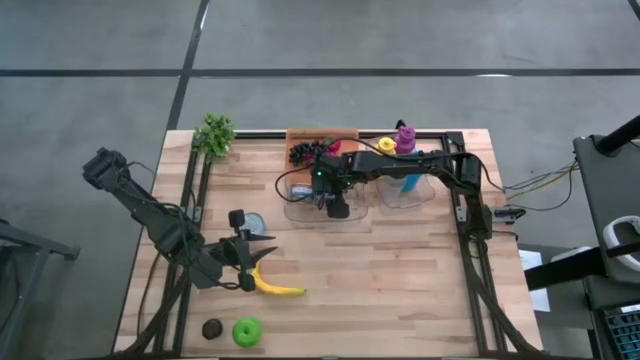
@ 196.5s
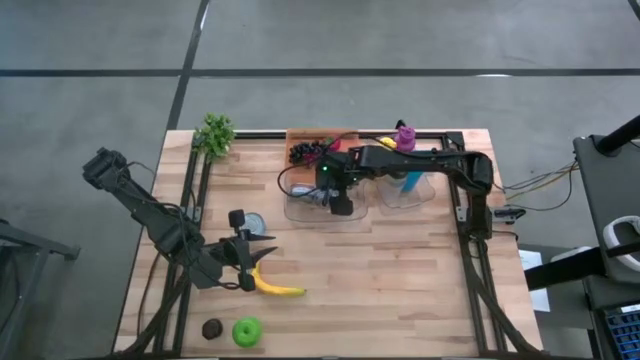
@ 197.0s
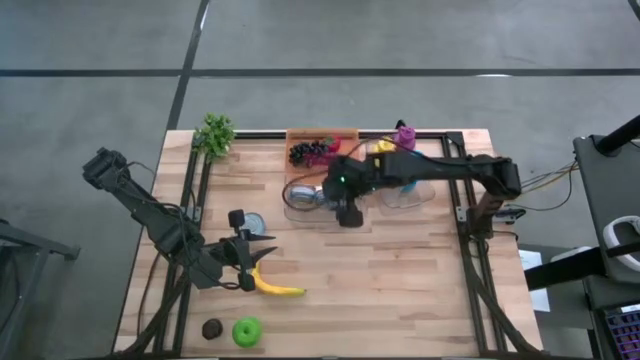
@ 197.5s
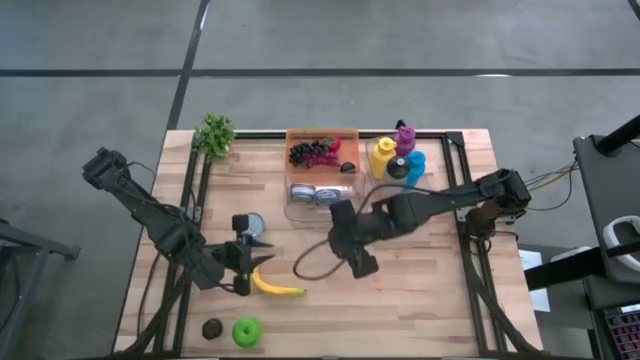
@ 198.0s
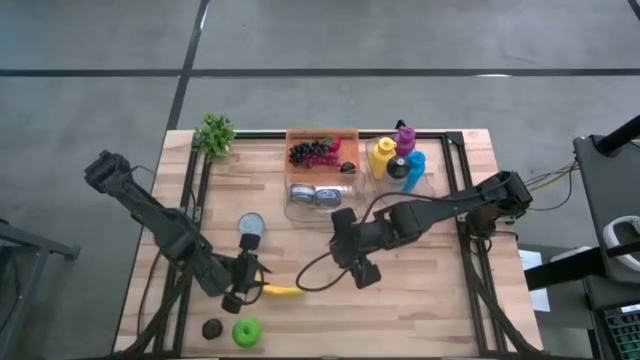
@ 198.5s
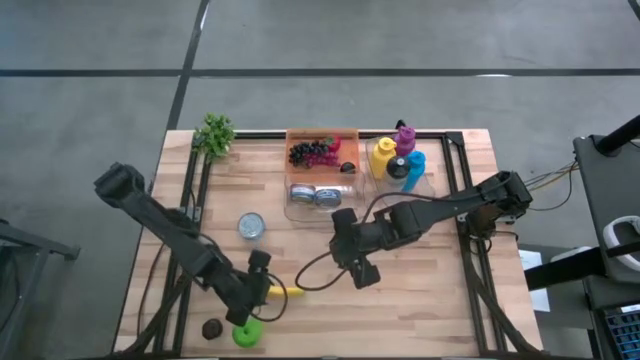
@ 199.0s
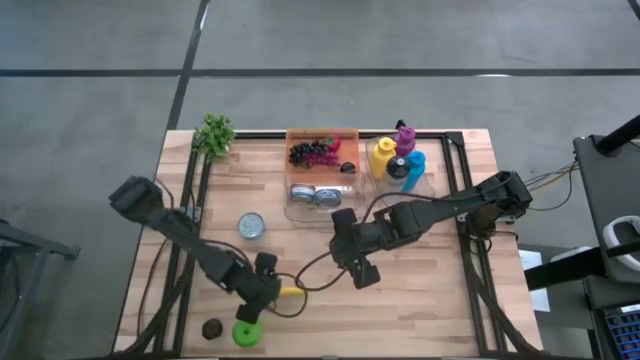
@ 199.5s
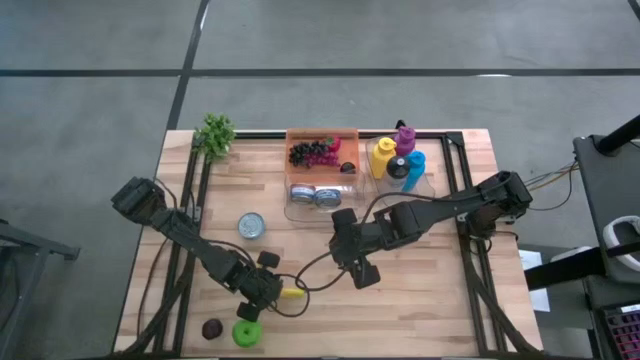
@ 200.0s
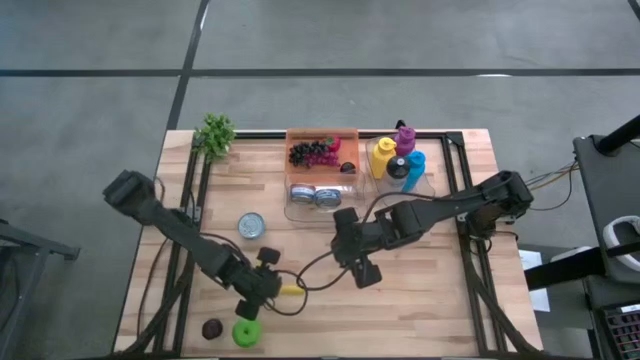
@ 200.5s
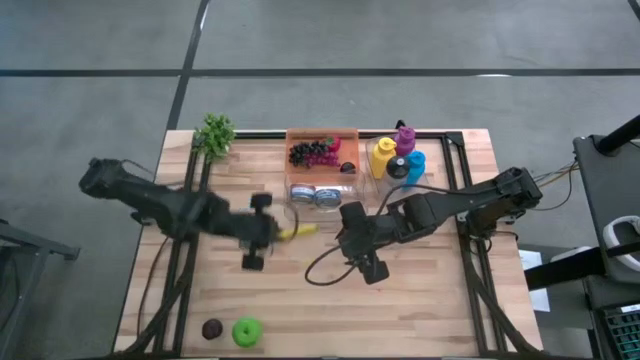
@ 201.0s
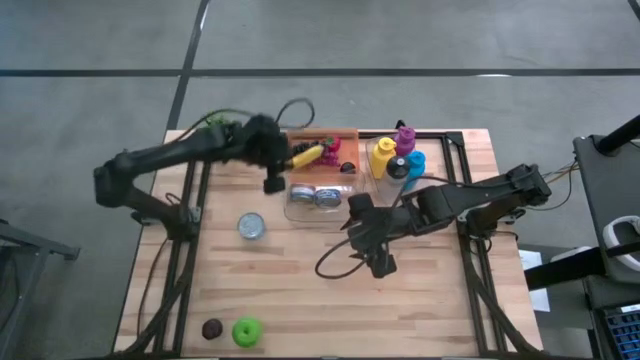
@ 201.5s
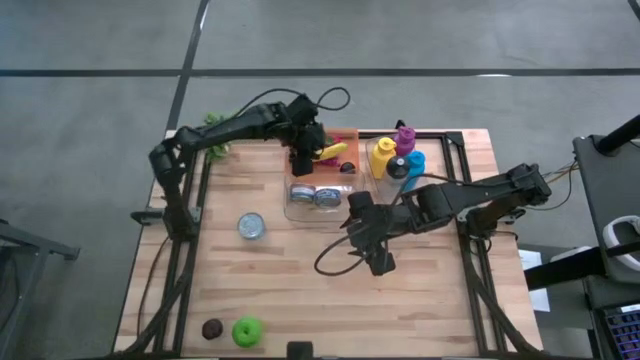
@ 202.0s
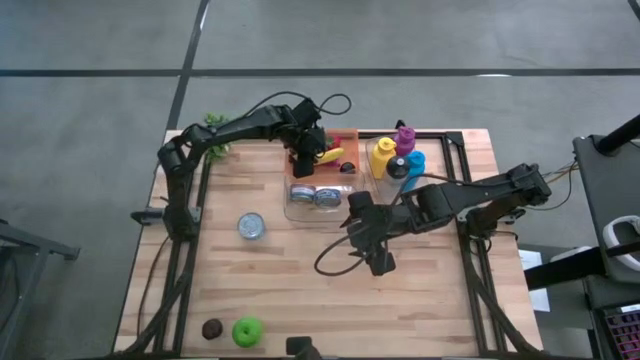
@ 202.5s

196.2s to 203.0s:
Task: Pick & Place Food Item
Put the banana into the orange bin

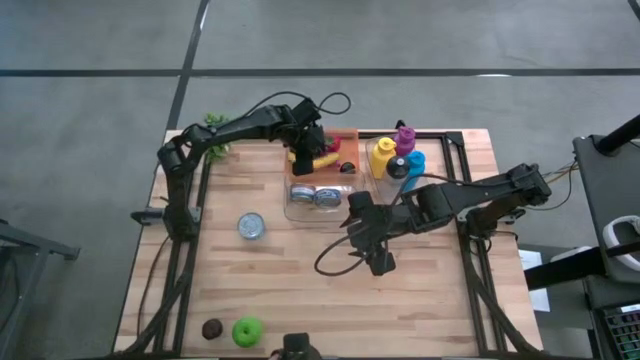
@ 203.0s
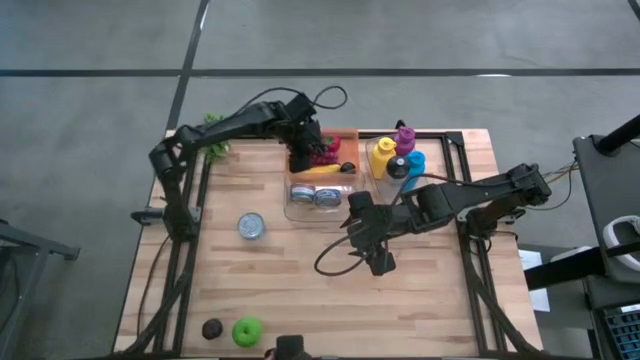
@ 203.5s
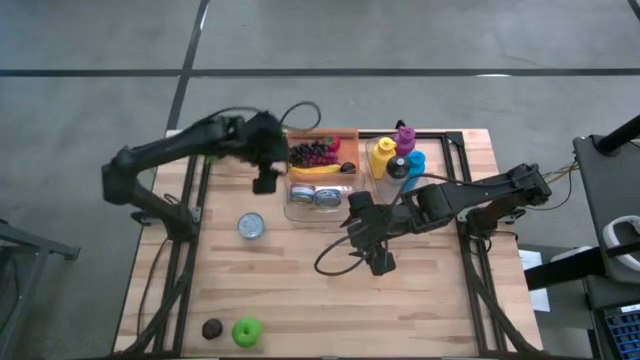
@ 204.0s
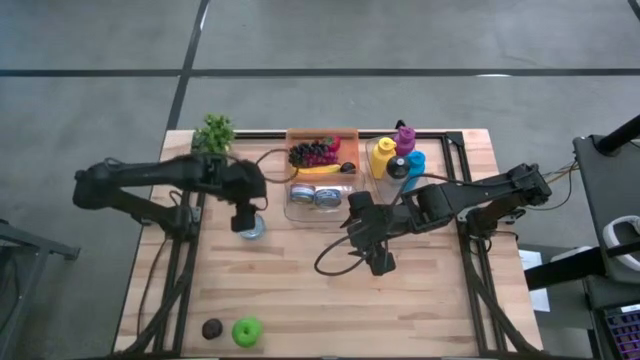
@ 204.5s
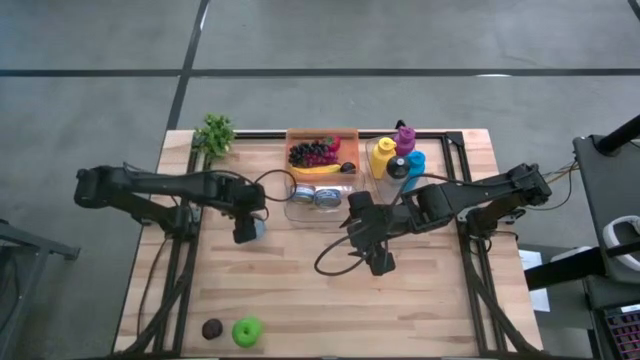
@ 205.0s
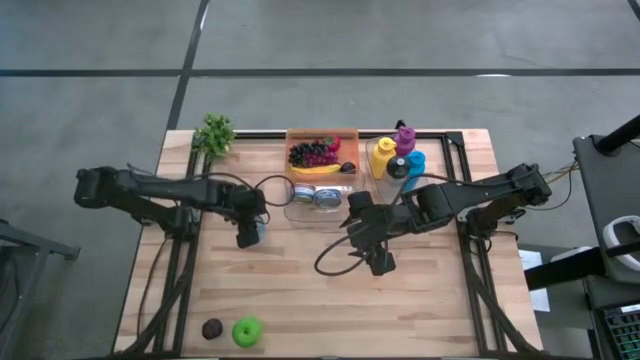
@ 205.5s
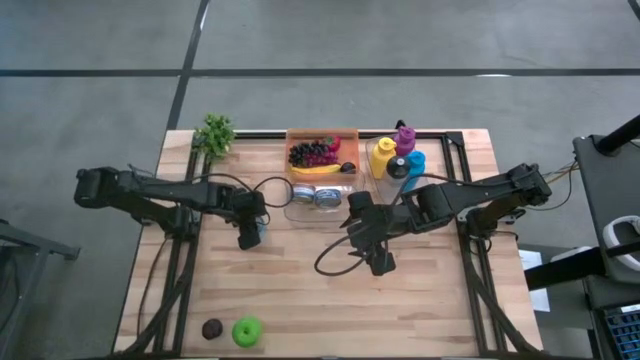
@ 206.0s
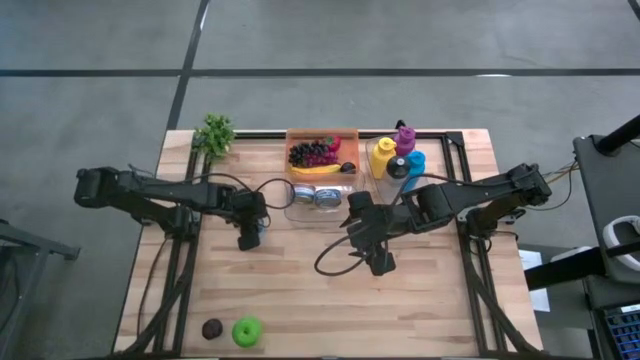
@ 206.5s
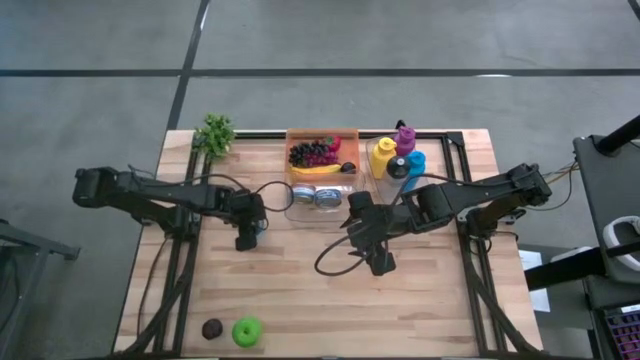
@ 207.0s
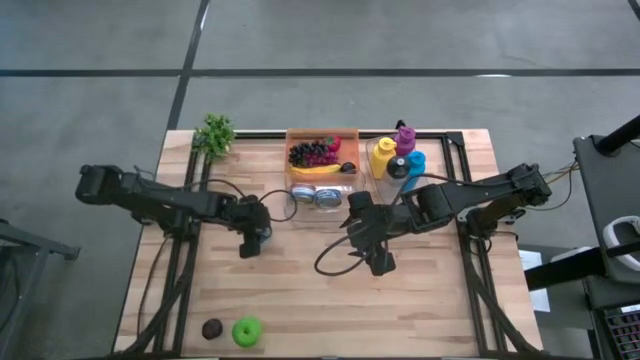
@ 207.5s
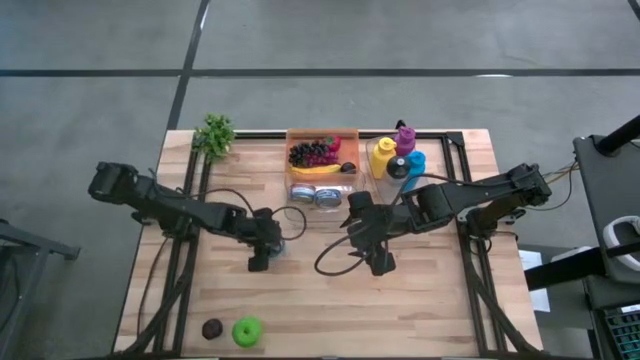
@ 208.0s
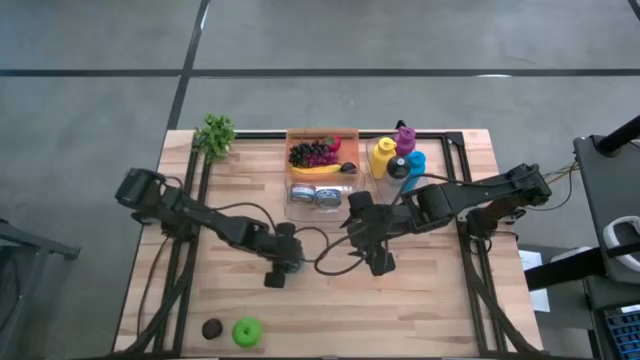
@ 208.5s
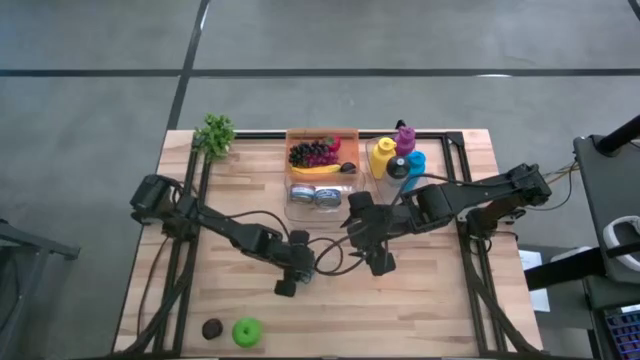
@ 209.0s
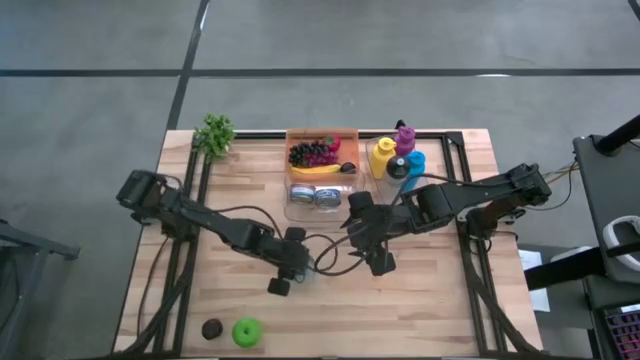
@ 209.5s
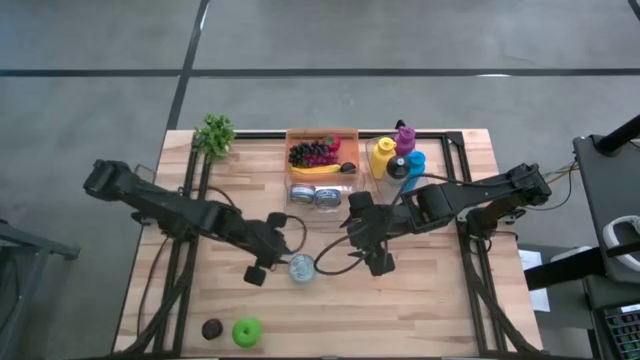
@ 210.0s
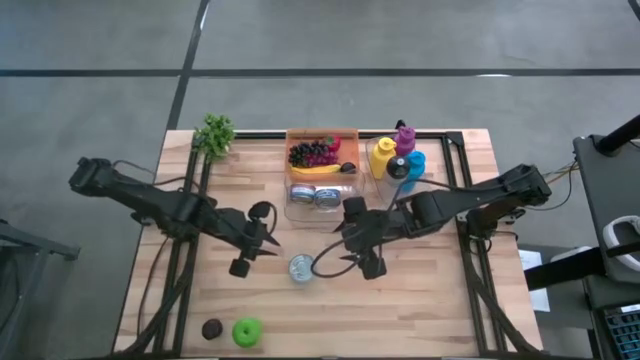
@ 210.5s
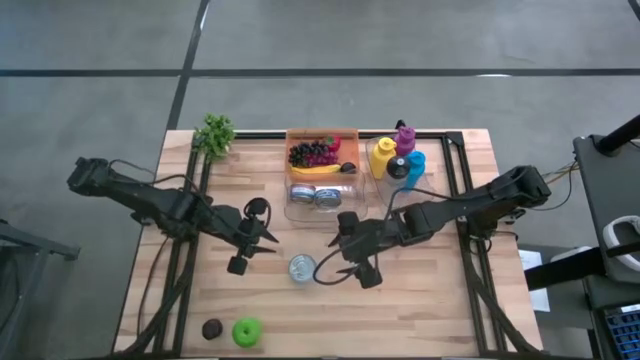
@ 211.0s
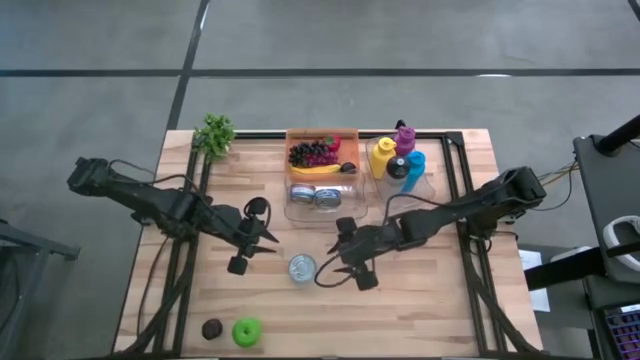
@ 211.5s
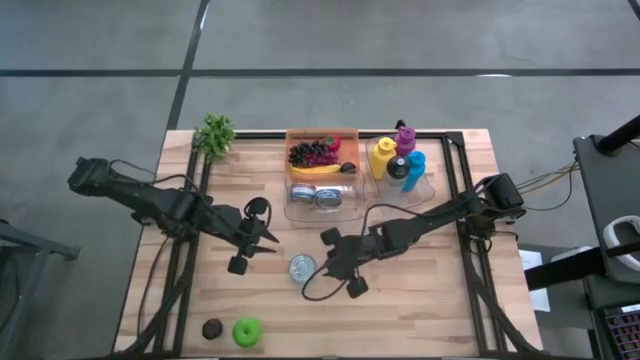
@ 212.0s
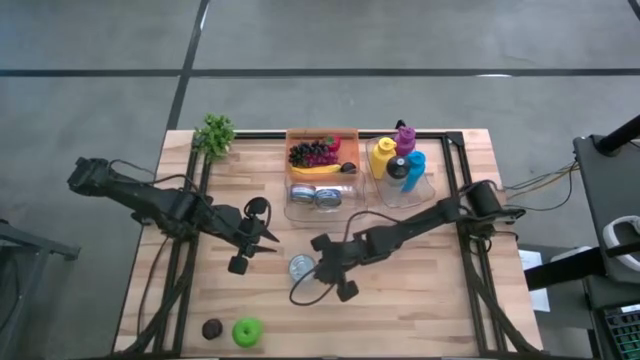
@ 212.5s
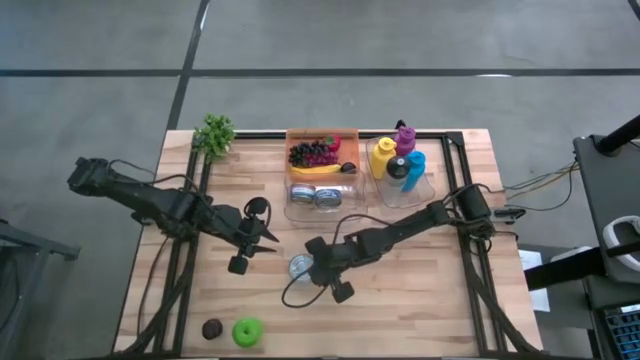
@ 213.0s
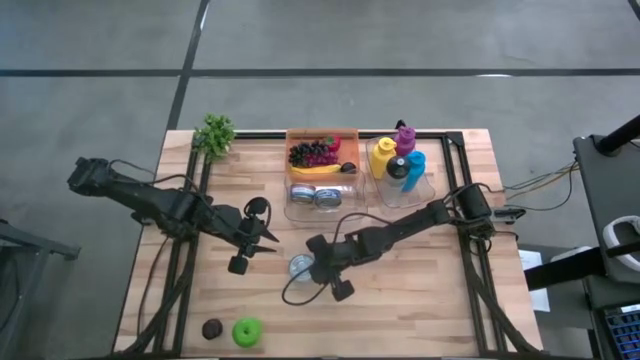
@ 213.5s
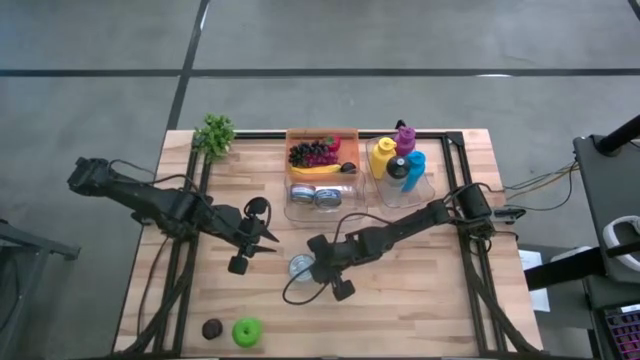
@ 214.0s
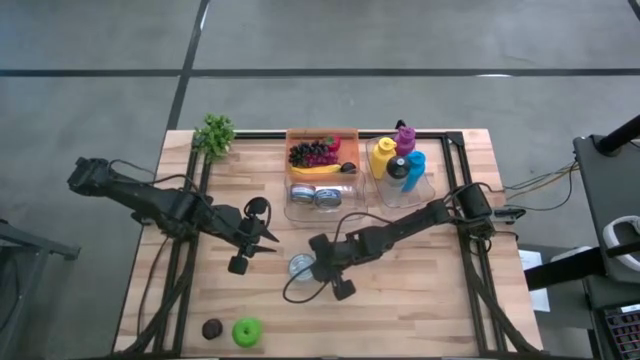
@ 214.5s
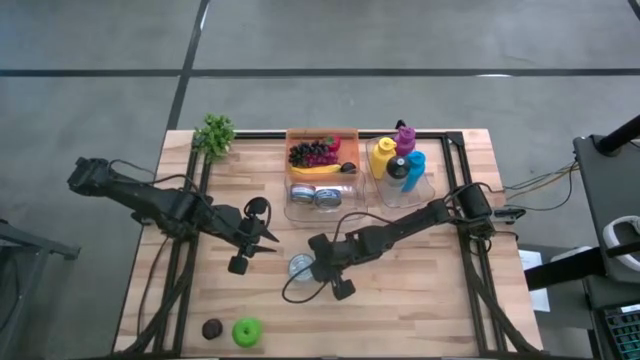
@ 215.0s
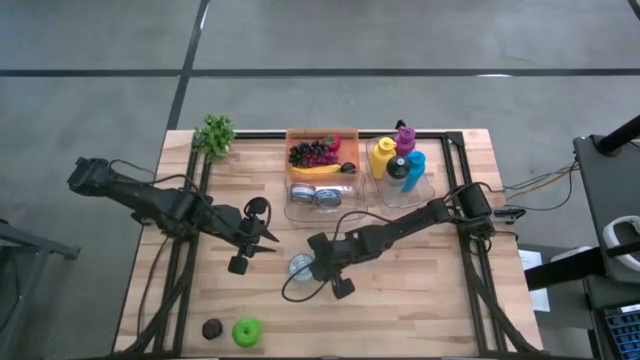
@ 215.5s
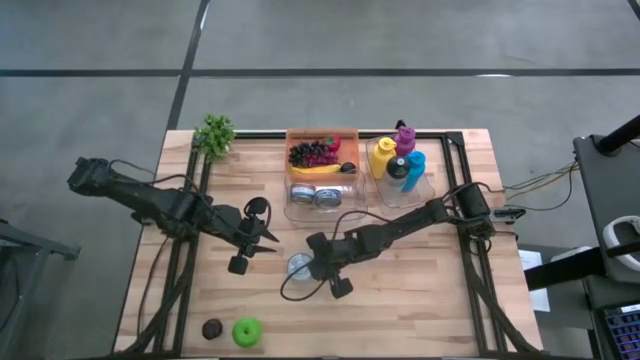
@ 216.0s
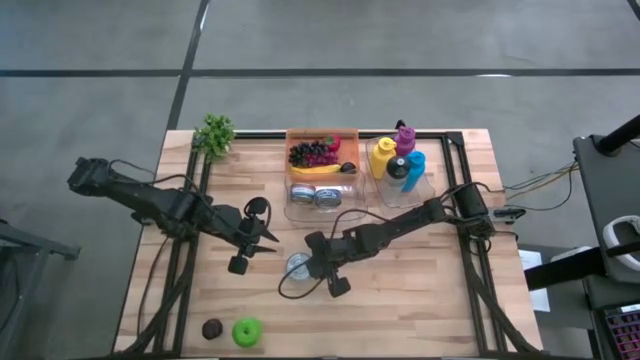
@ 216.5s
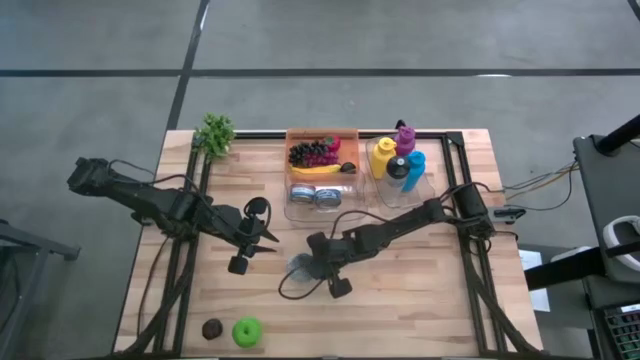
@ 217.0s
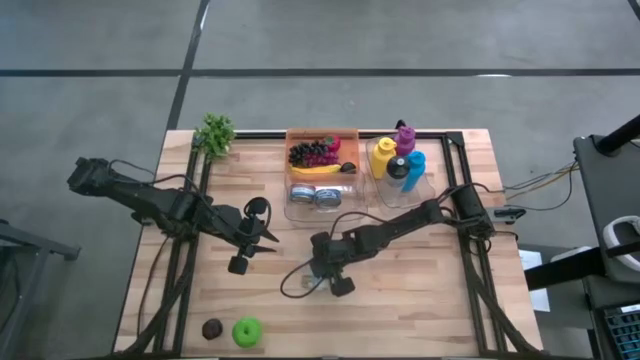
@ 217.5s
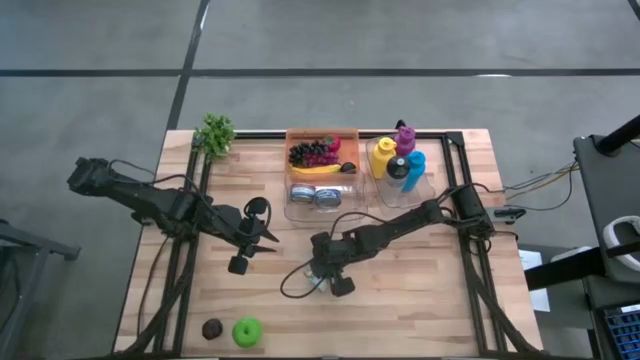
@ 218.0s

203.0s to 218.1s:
Put the yellow and blue can into the left transparent bin
